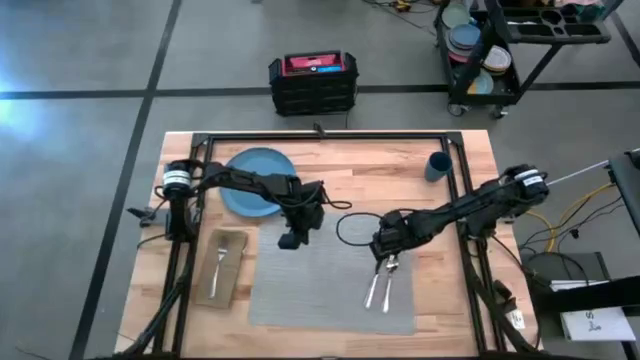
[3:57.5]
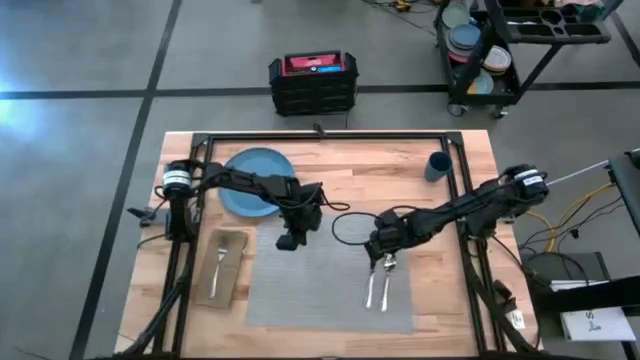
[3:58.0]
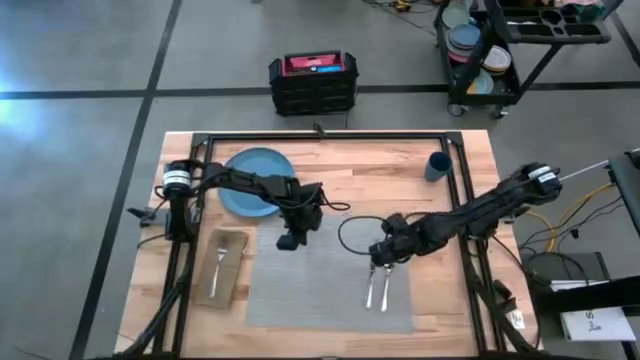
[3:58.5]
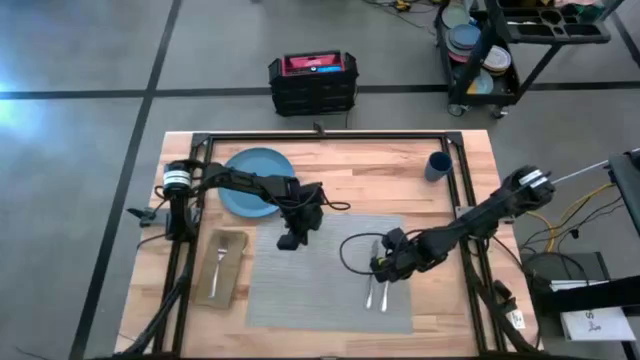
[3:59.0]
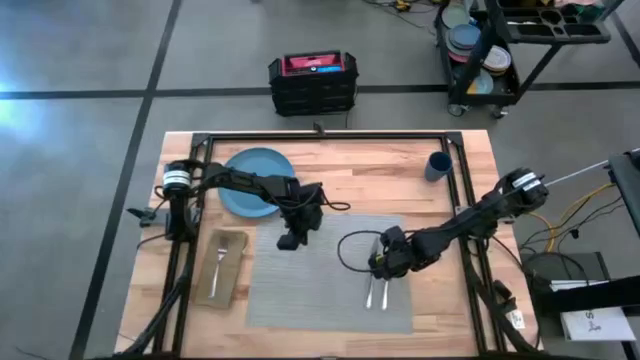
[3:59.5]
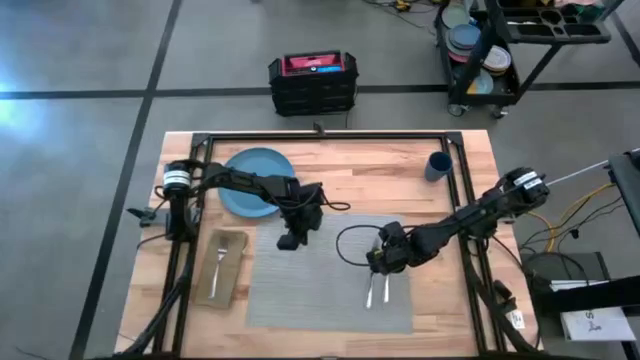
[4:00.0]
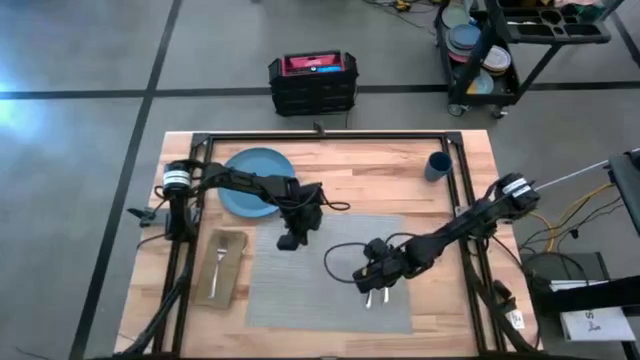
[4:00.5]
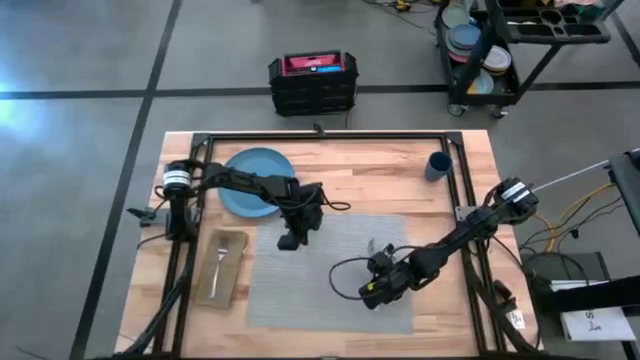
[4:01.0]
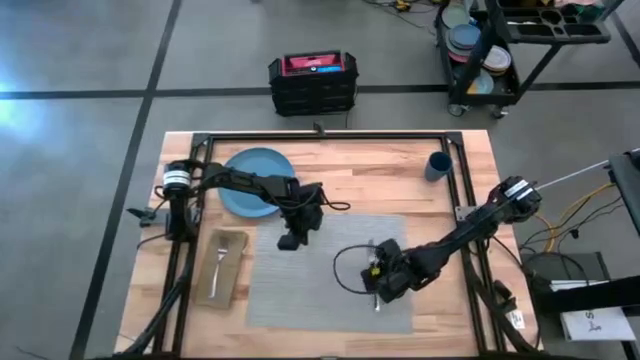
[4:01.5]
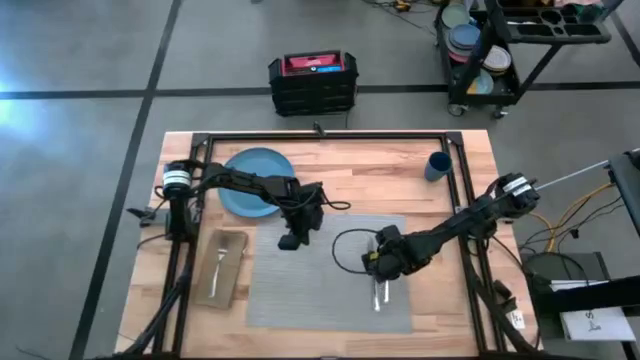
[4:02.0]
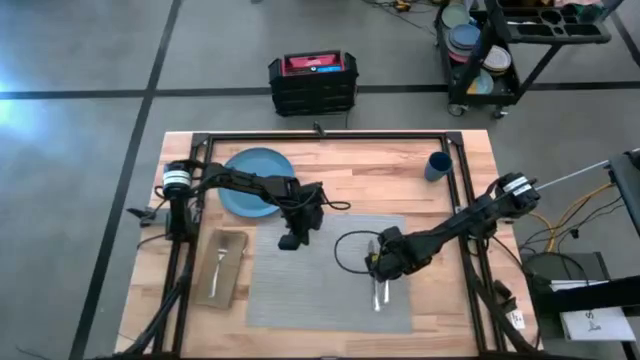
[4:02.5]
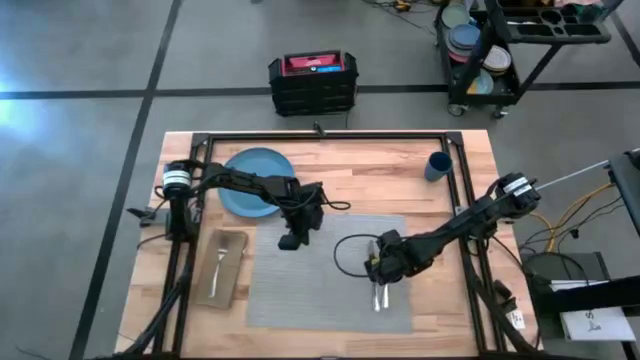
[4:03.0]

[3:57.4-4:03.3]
Task: Set table place
Adjust the utensils on the gray table mat

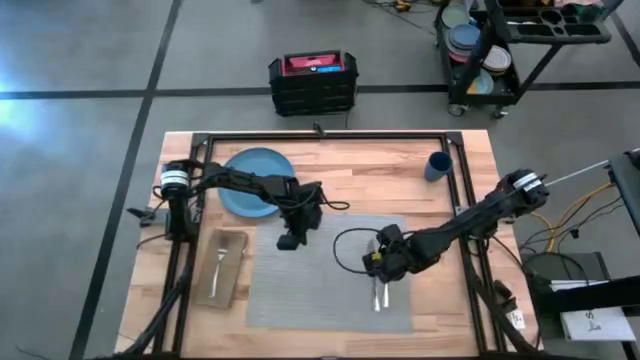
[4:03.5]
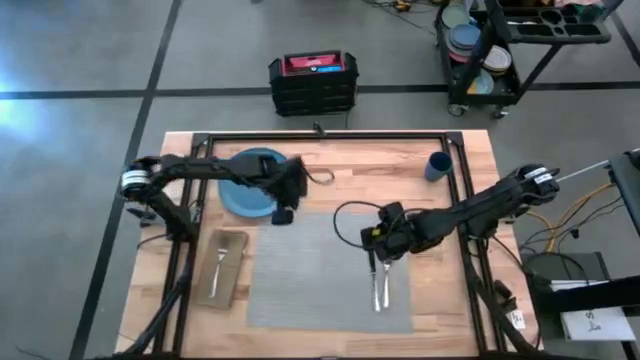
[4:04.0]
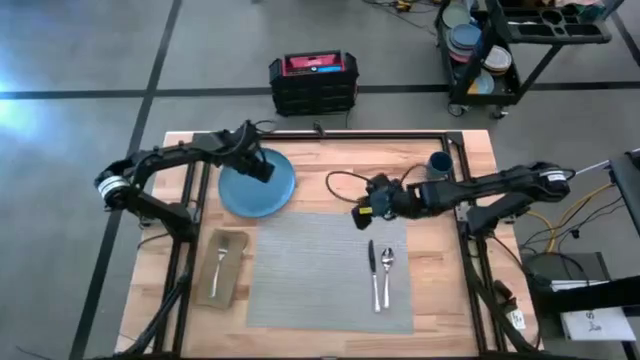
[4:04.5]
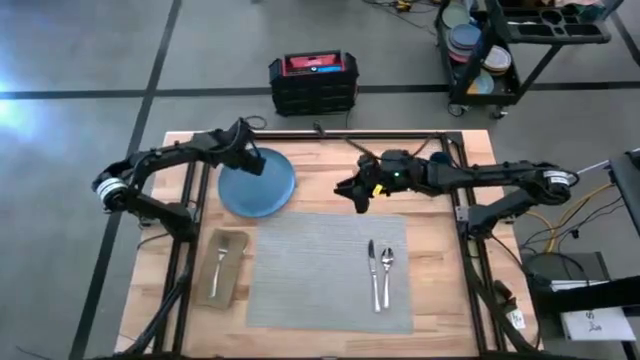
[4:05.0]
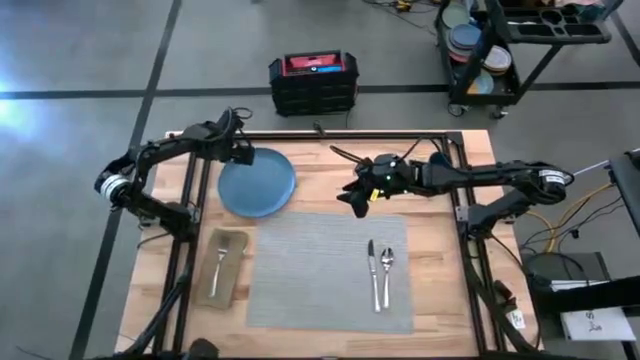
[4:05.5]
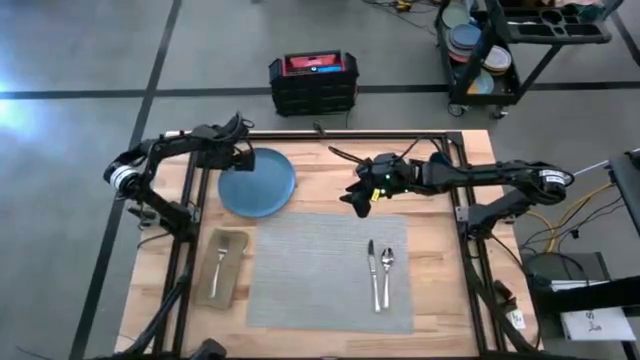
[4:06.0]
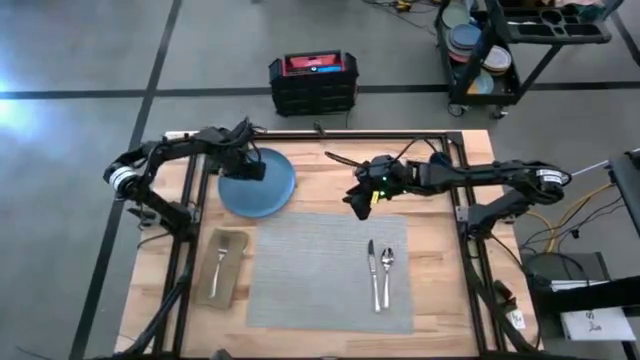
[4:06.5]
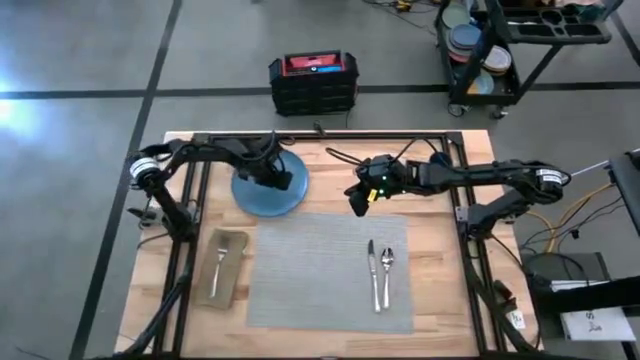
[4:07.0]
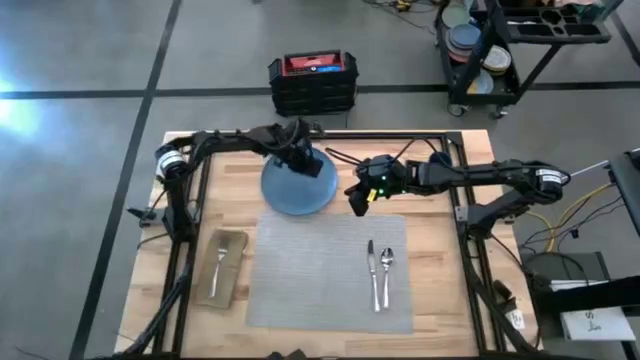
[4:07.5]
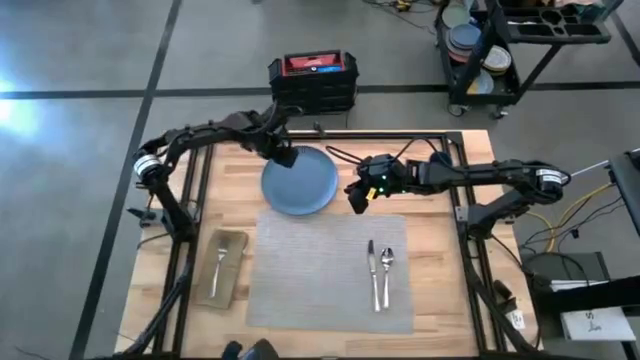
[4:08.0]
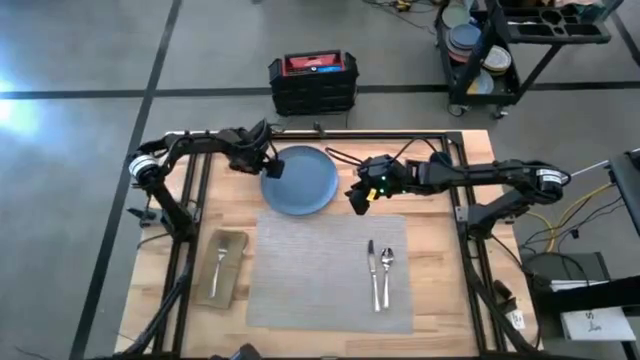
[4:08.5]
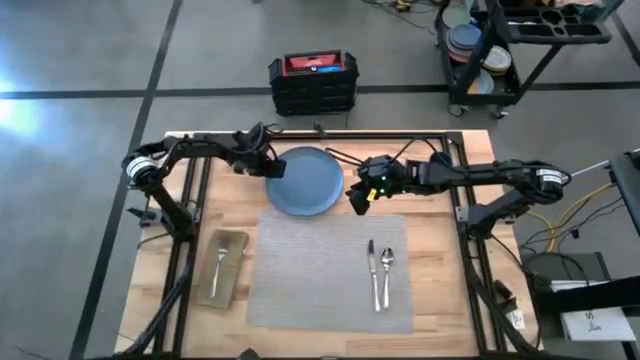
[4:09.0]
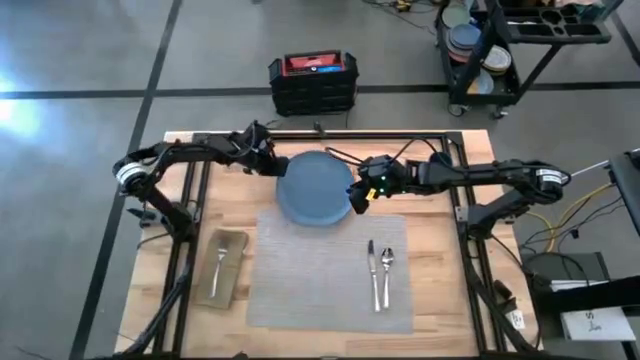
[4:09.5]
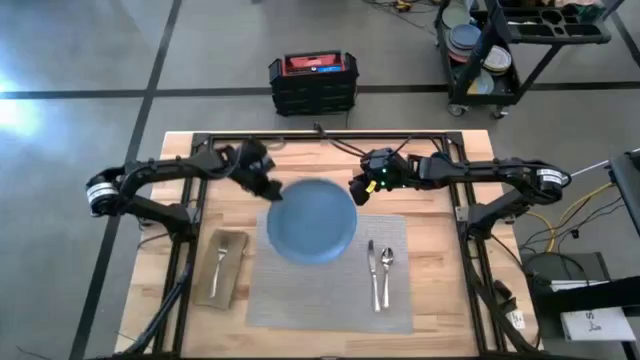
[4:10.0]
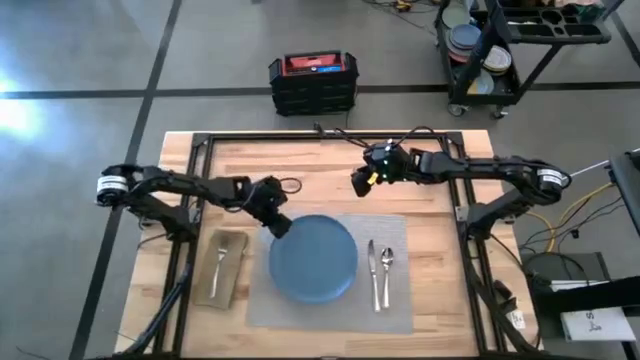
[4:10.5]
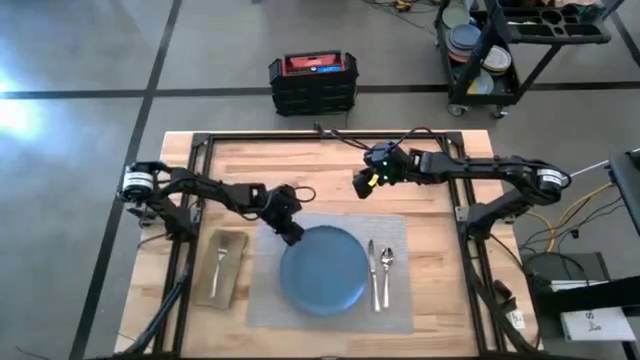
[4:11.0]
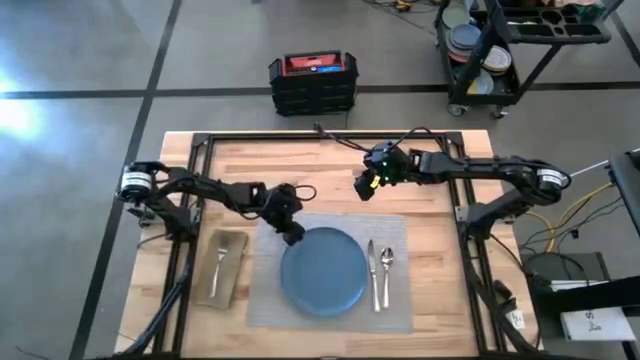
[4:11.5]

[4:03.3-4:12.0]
Put the blue plate in the center of the gray table mat

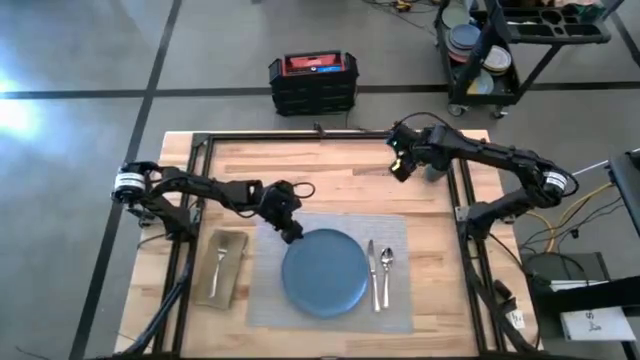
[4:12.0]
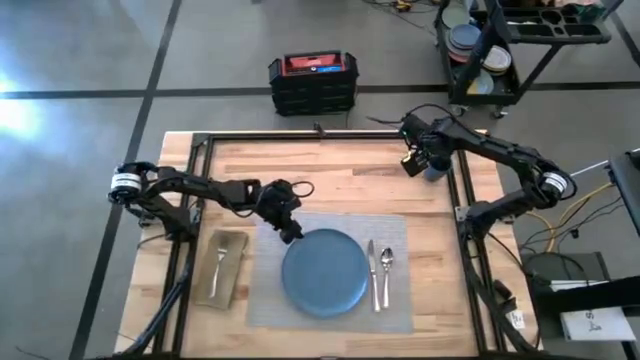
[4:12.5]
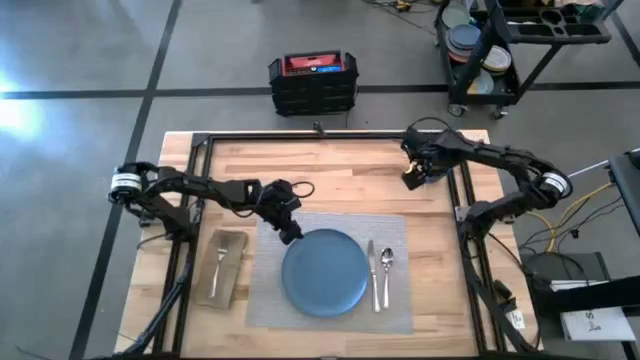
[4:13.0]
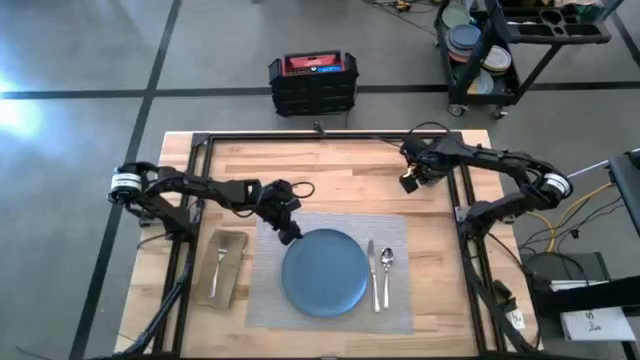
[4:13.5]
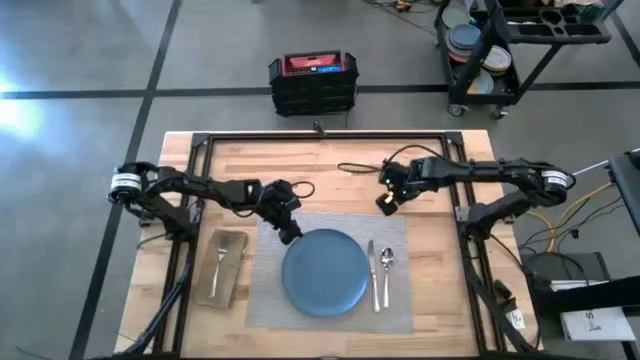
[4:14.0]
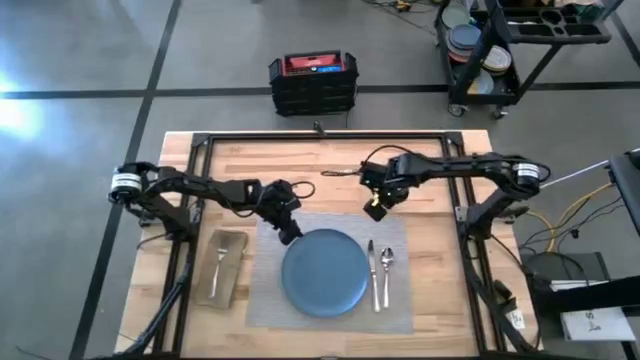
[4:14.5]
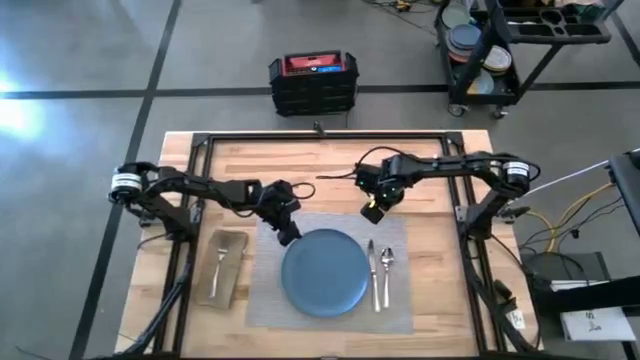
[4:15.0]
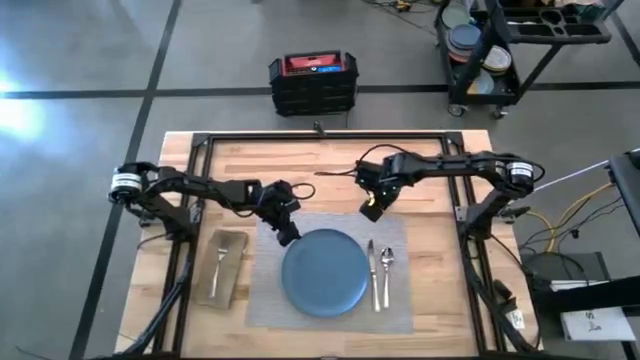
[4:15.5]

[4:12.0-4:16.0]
Move the blue cup to the top right of the gray table mat

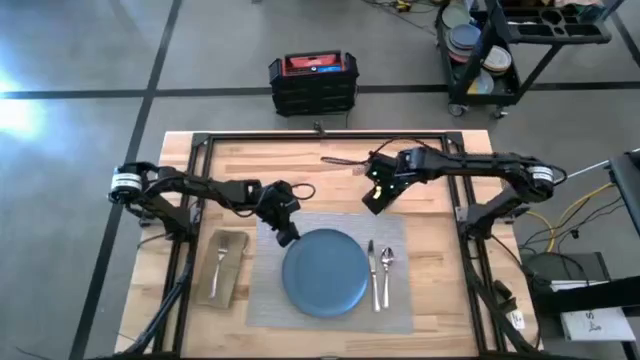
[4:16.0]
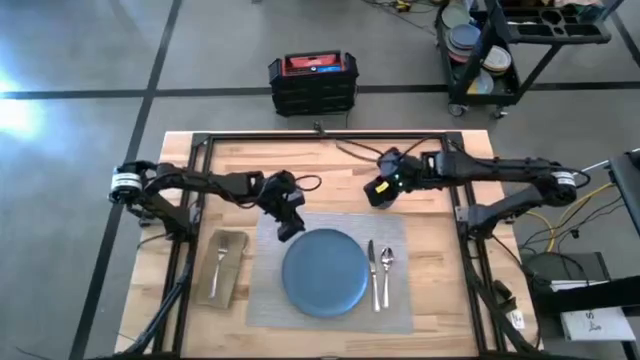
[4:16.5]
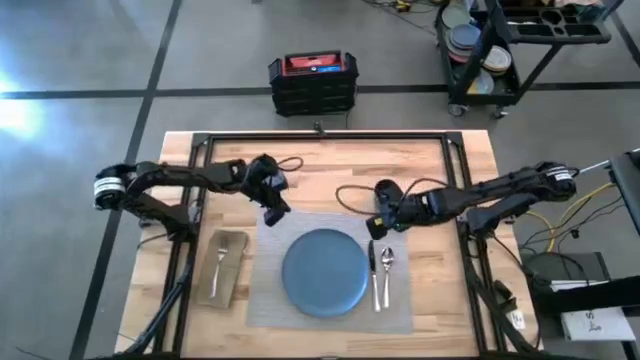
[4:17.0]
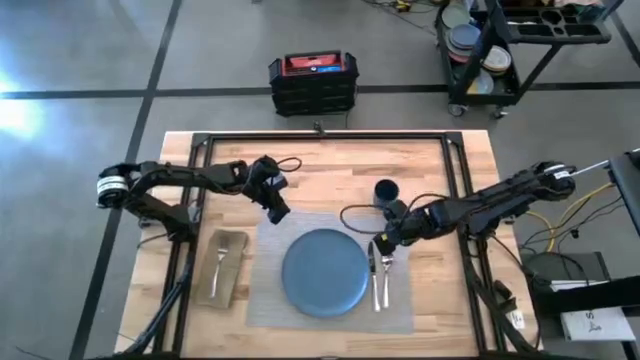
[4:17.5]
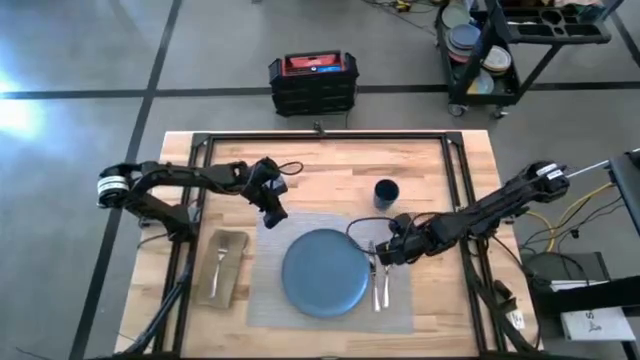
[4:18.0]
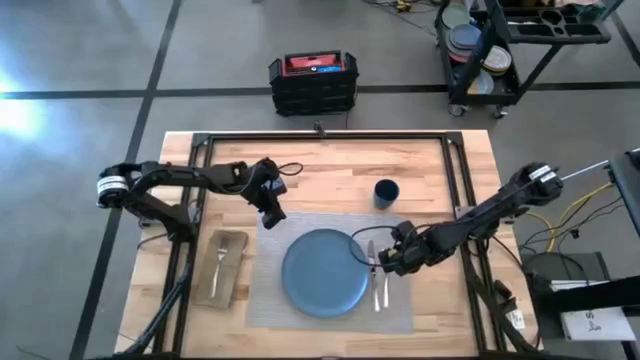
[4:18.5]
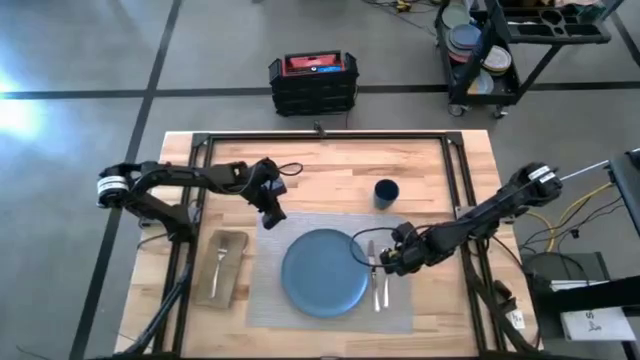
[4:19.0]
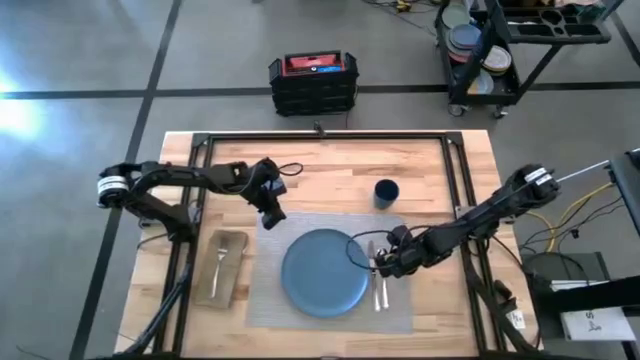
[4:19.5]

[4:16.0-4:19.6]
Adjust the silver spoon on the gray table mat

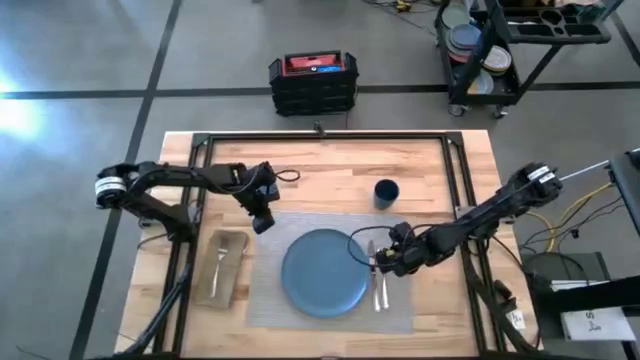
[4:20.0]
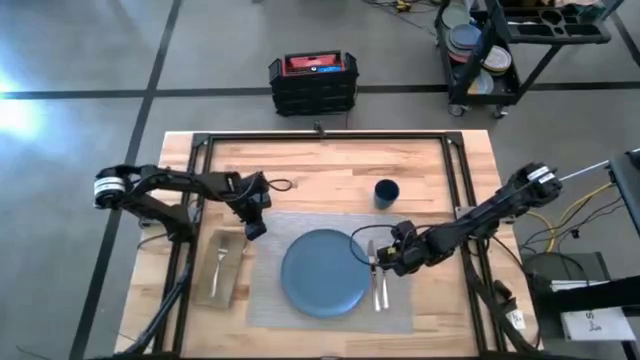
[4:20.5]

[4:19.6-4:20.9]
Adjust the gray table mat
